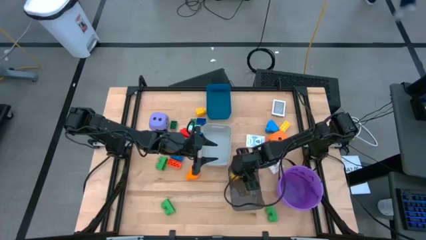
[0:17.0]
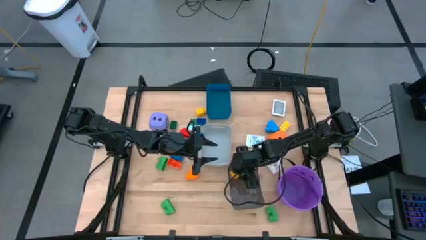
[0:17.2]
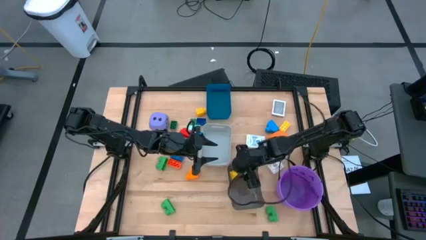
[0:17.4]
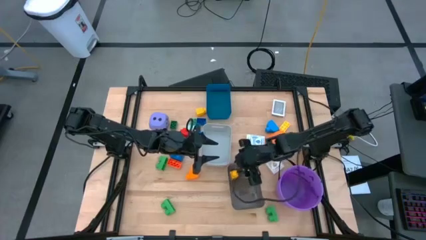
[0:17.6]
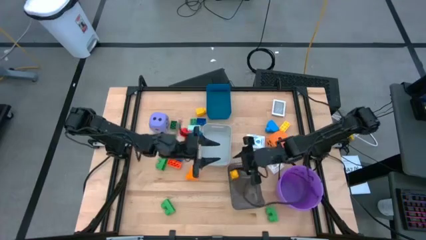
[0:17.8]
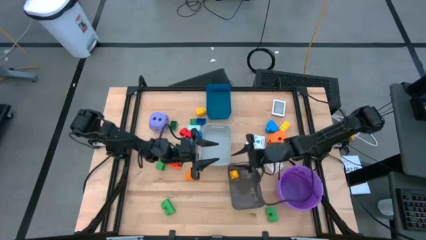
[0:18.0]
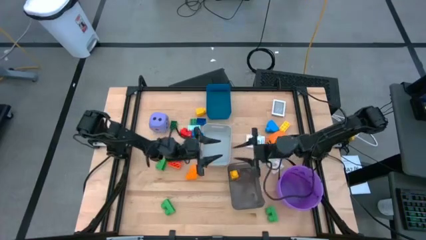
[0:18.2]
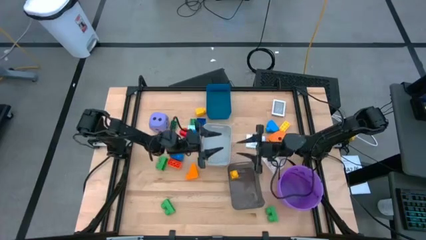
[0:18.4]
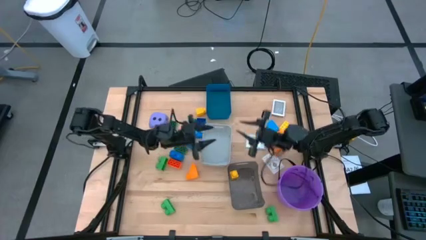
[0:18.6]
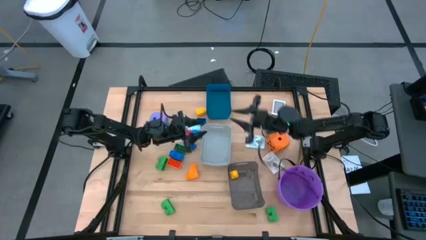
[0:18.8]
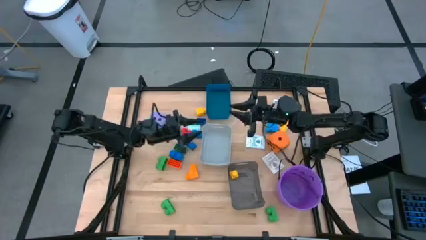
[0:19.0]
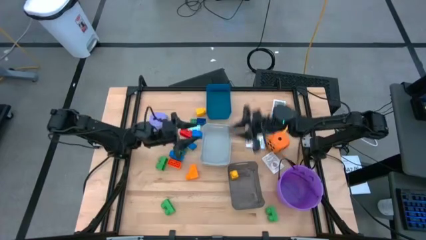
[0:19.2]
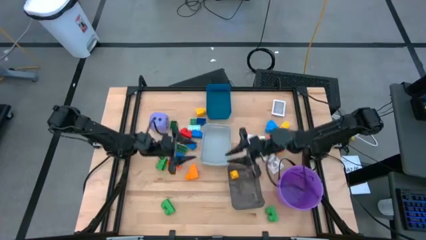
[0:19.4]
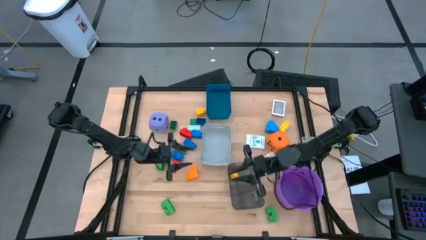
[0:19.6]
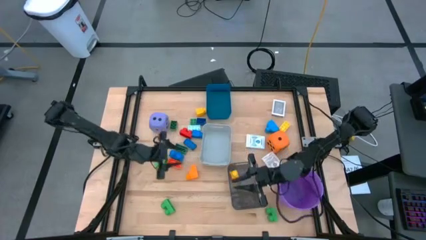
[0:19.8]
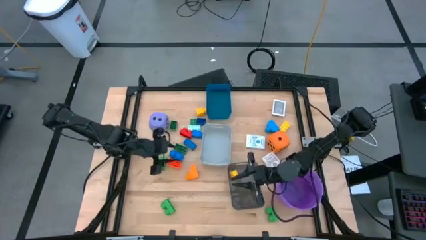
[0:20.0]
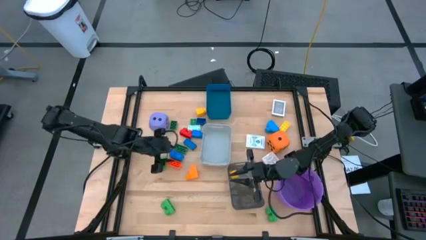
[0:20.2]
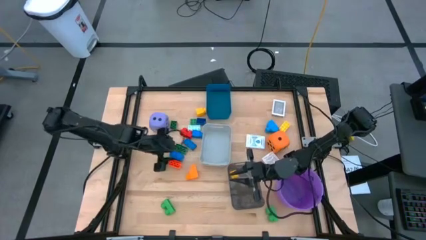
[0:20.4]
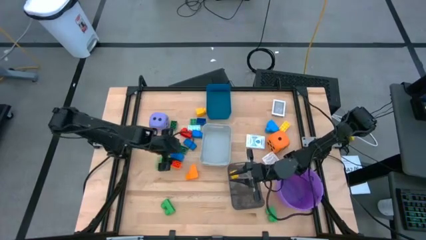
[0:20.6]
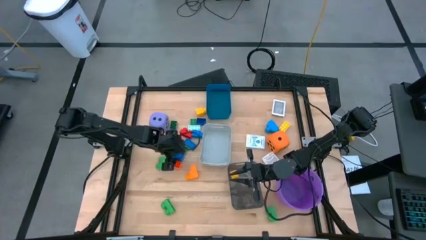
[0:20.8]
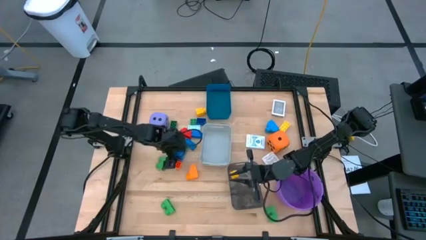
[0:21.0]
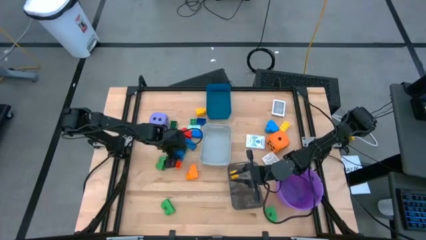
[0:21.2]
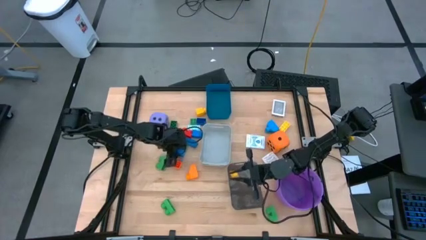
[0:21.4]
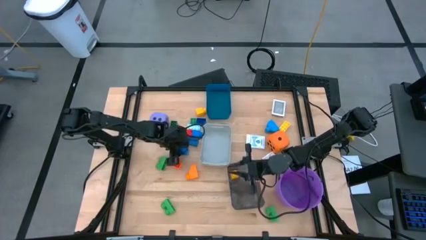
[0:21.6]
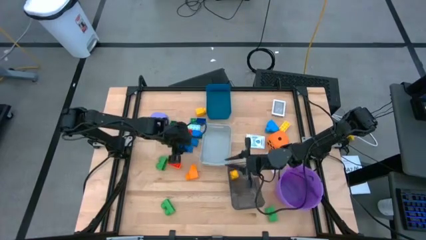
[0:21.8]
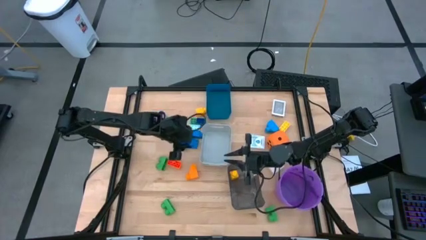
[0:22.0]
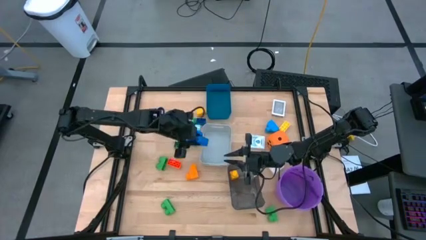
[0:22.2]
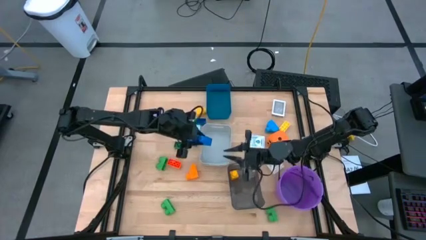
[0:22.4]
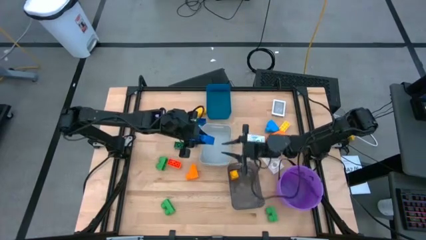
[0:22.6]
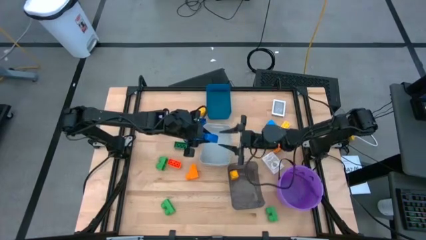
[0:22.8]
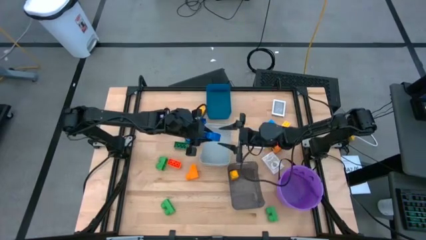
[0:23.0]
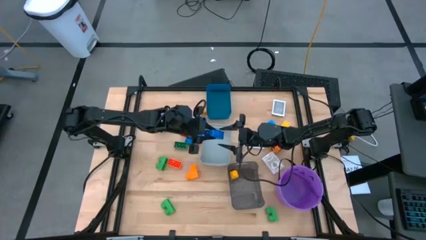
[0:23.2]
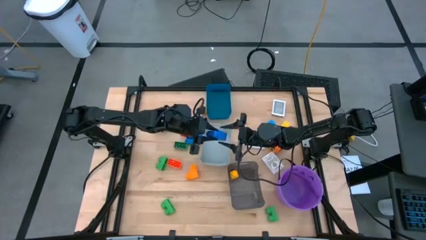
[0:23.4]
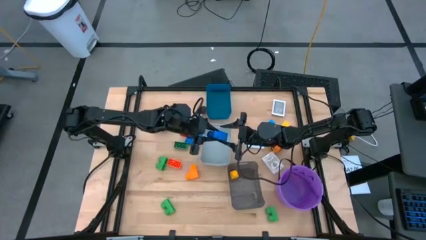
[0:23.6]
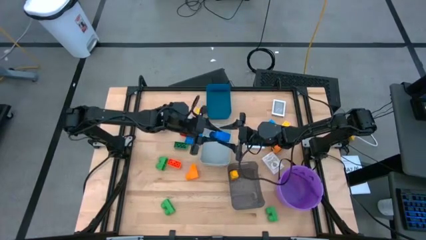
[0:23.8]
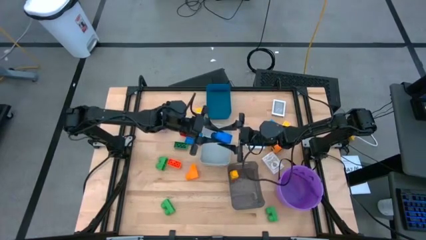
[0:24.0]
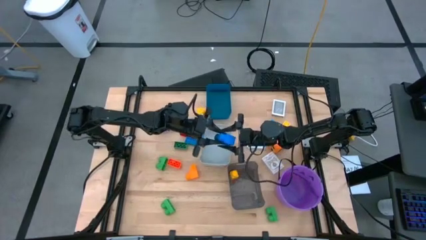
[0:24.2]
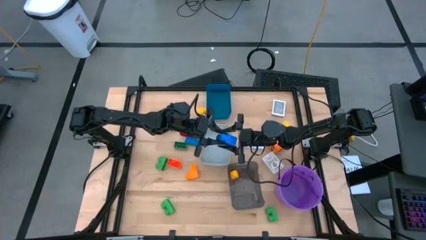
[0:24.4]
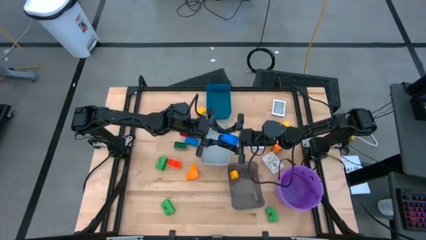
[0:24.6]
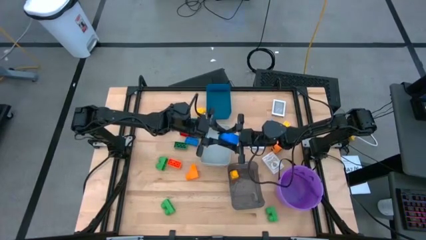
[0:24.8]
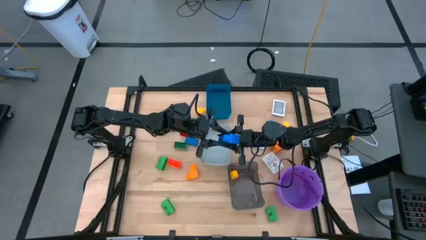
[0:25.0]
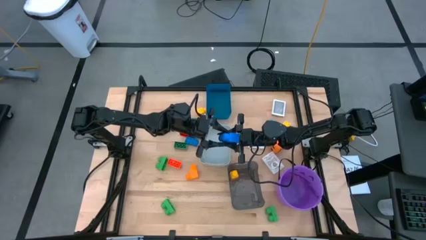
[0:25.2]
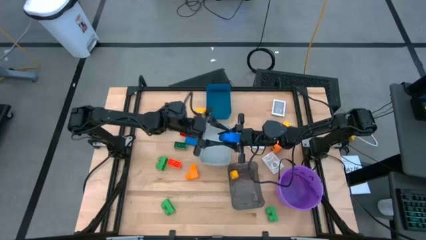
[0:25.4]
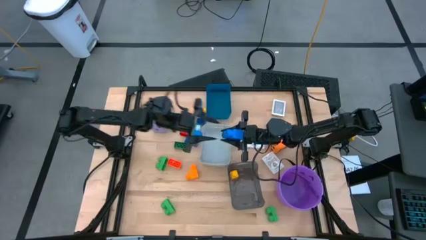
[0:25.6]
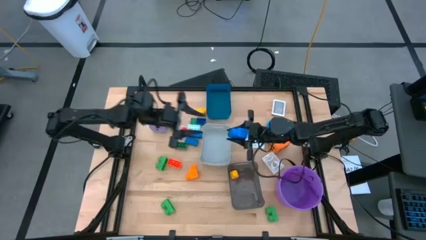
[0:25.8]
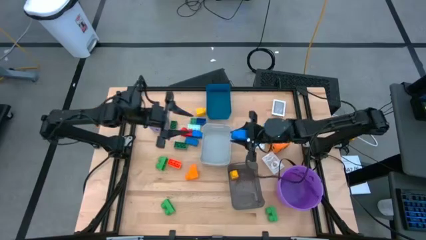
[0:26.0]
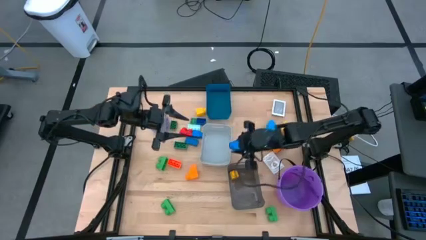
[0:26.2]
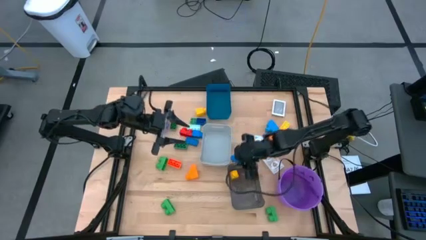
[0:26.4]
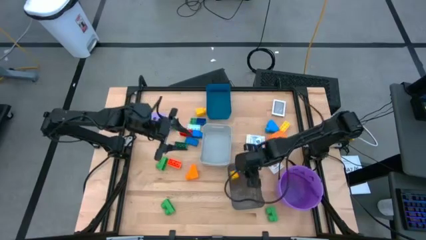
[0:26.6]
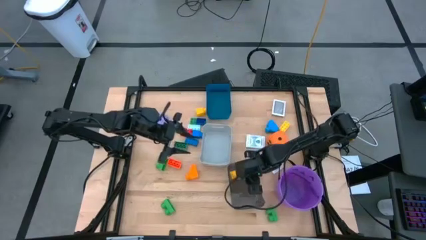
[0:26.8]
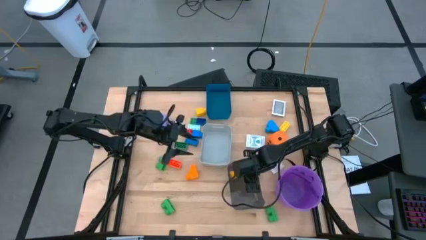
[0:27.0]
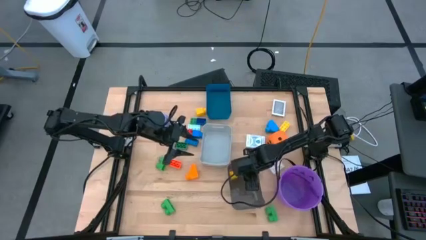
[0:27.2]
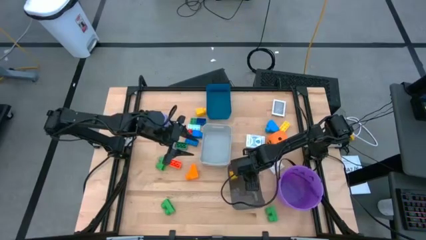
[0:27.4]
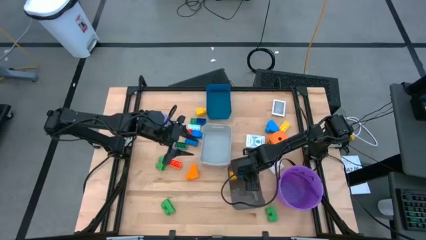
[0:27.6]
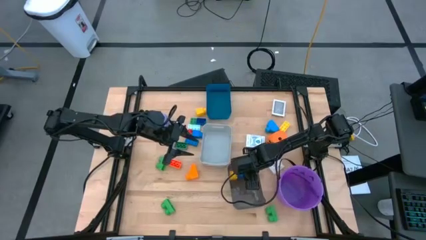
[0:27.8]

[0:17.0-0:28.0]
Task: Pick & Place Toys
Put the blue game piece into the black bin
